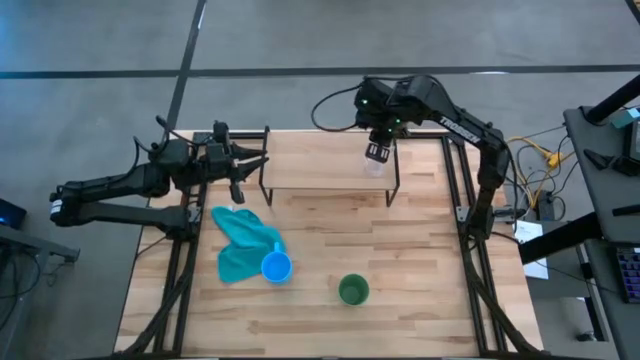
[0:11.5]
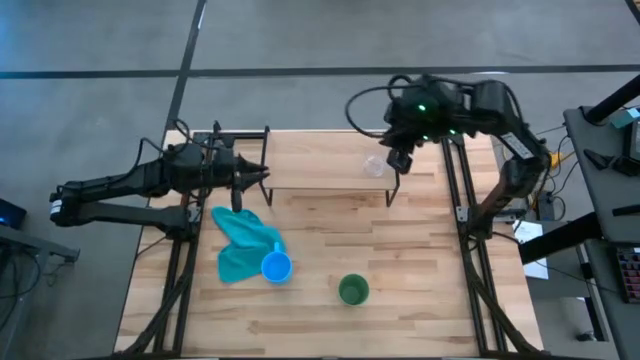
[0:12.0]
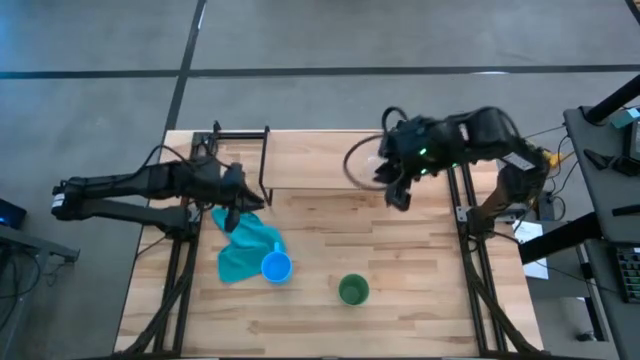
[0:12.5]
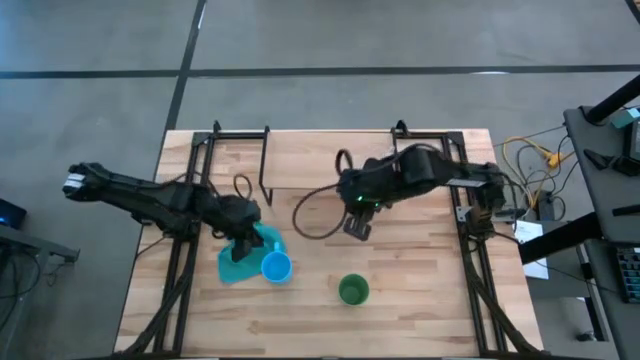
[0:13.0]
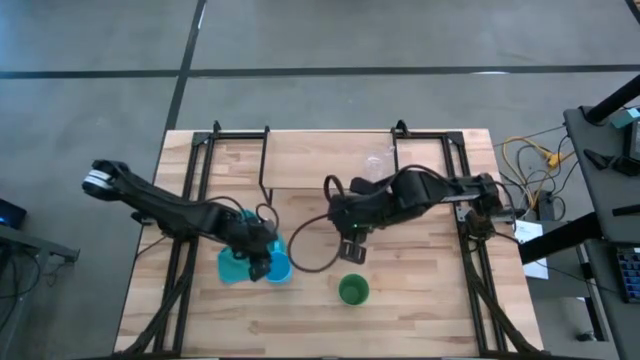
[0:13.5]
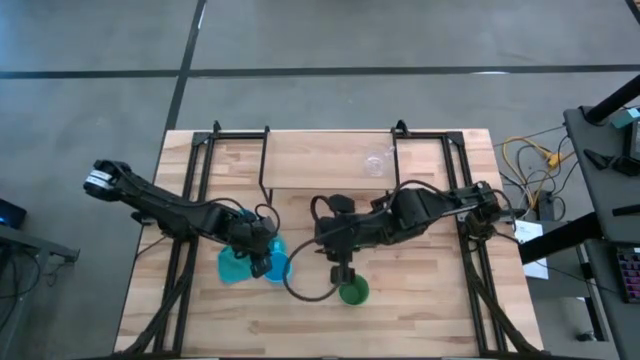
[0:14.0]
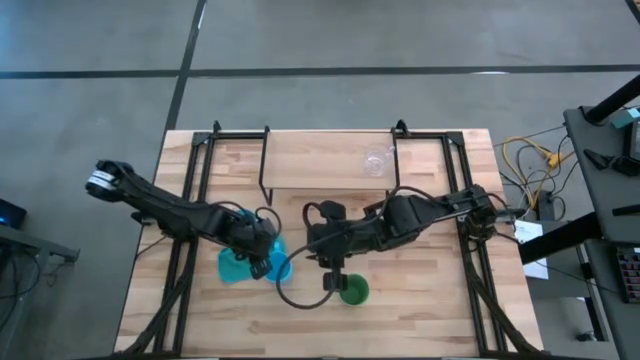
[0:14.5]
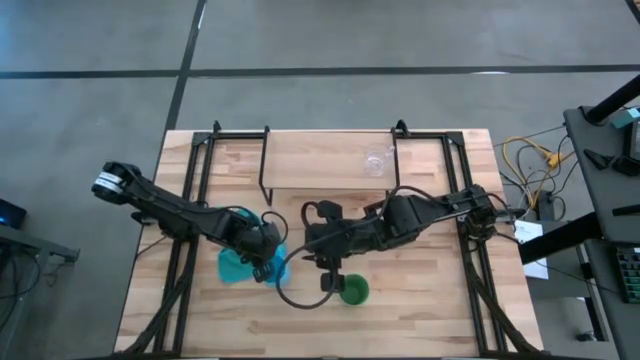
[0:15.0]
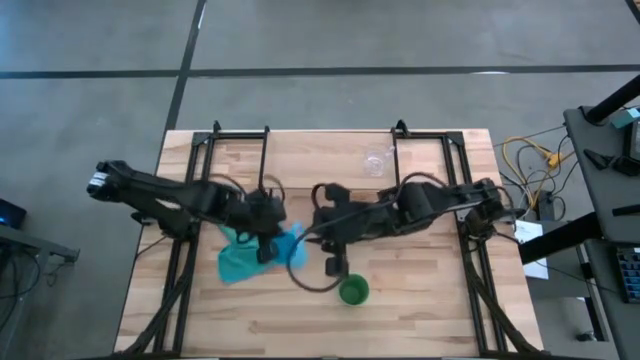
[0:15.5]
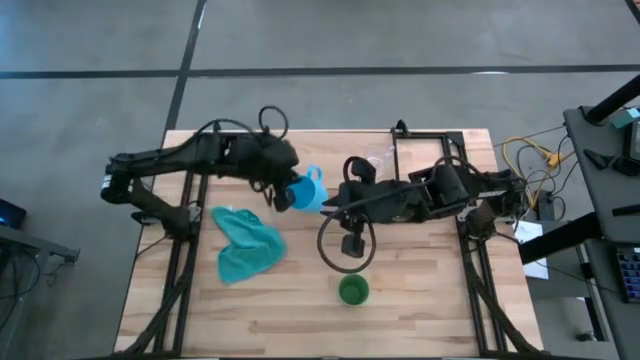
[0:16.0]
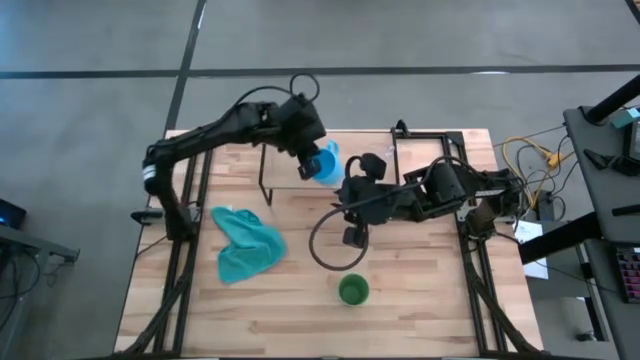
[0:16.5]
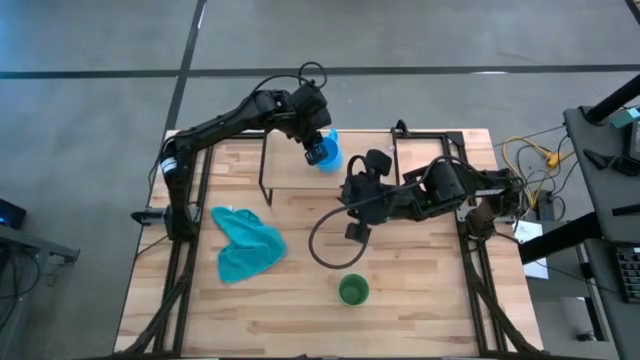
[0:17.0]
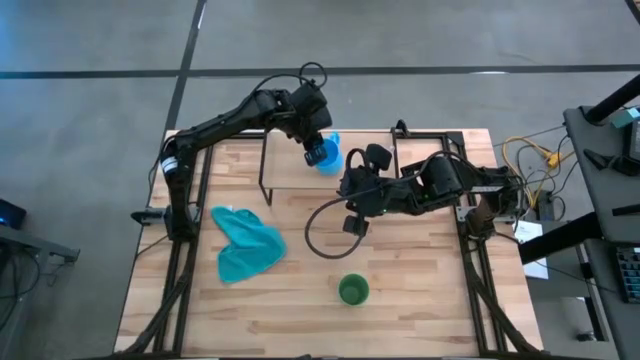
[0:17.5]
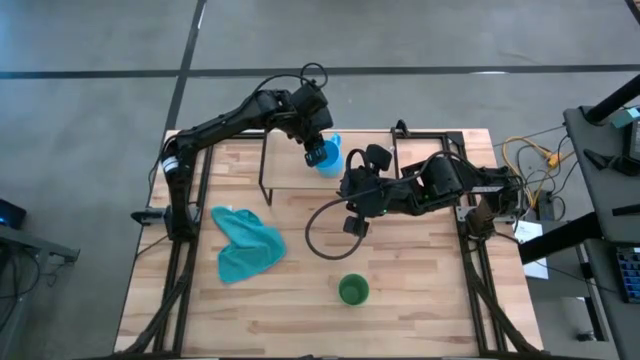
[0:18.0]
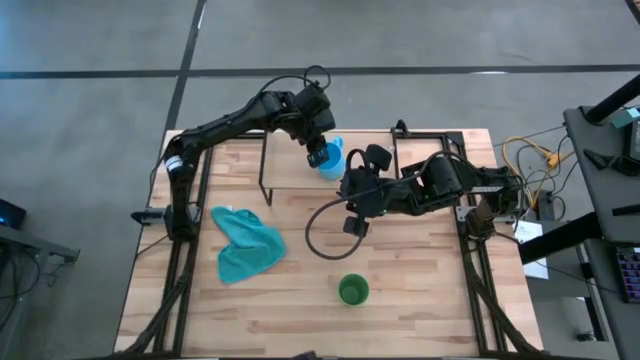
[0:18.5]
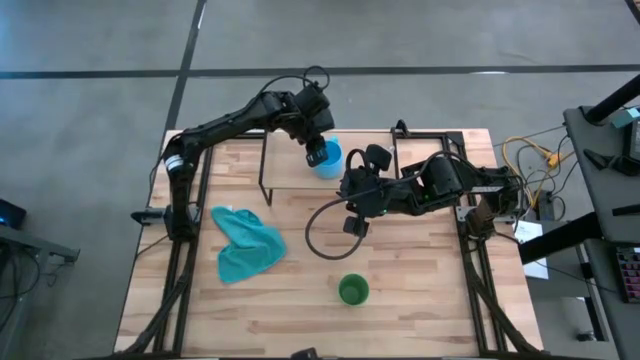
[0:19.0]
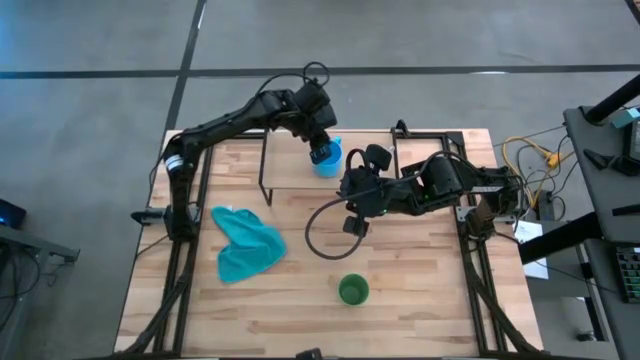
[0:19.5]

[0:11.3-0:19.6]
Task: Stack small to large cups/mugs on shelf
Put the blue mug on the shelf

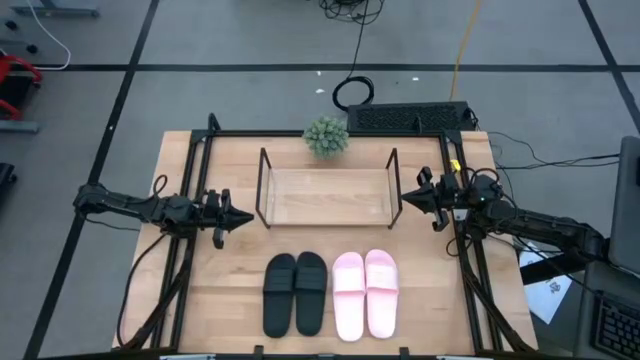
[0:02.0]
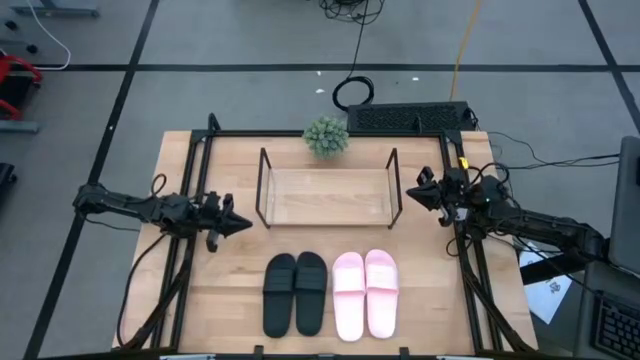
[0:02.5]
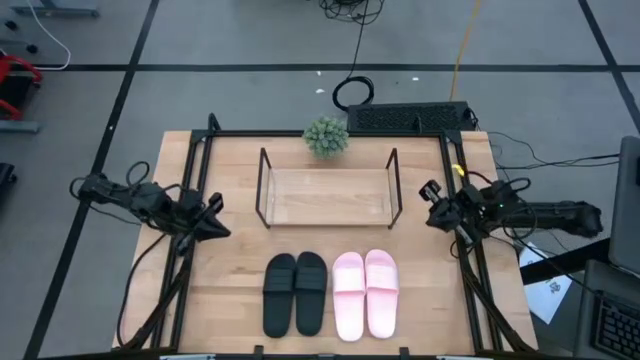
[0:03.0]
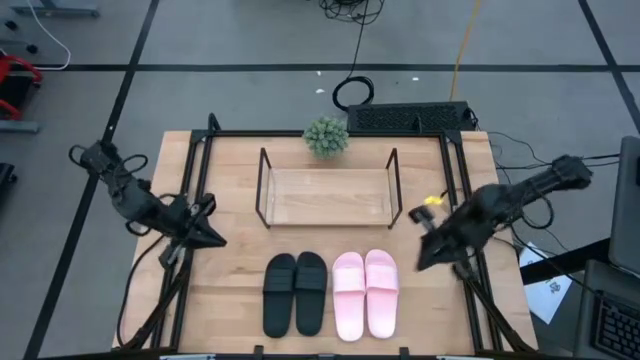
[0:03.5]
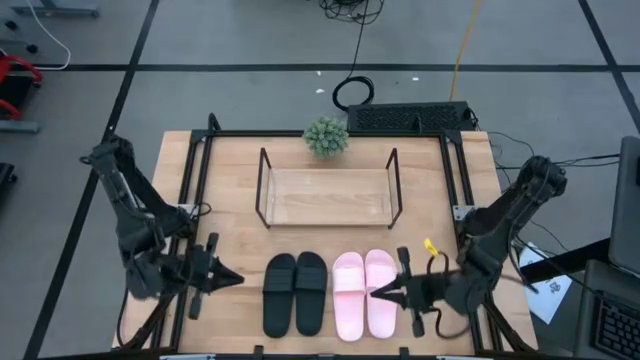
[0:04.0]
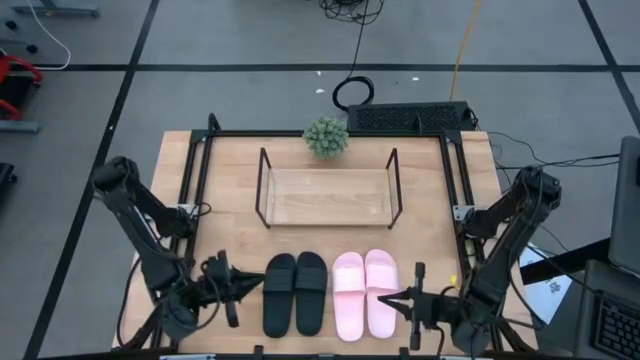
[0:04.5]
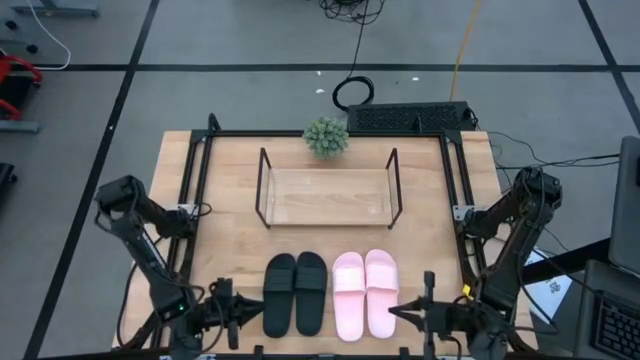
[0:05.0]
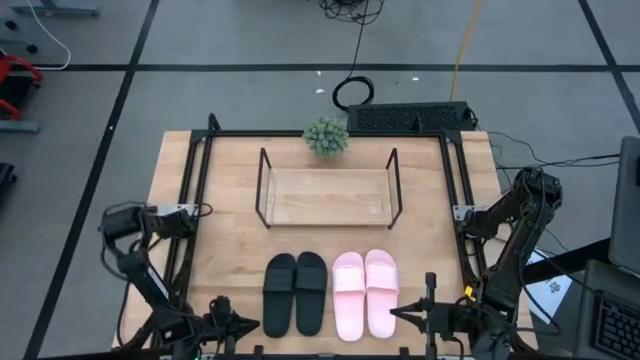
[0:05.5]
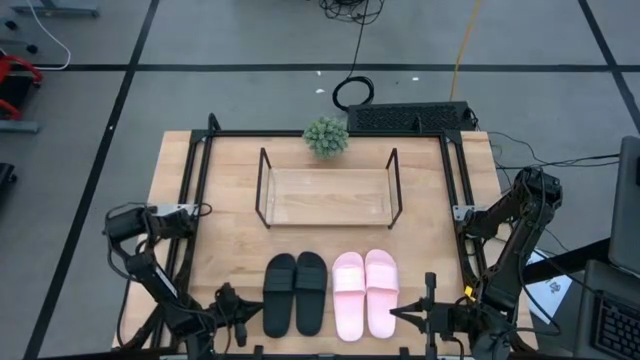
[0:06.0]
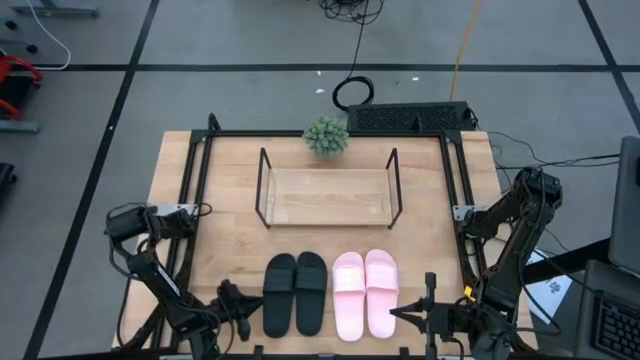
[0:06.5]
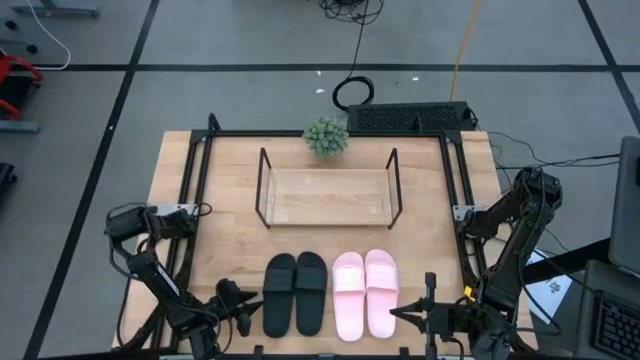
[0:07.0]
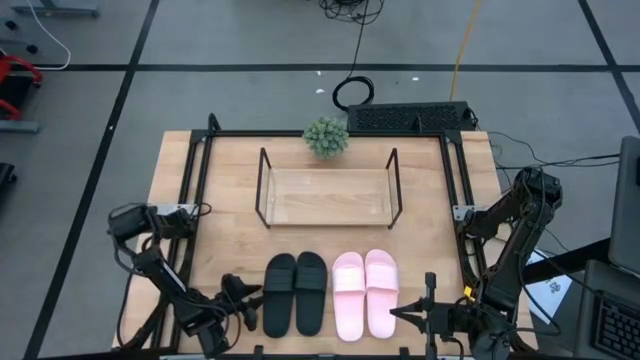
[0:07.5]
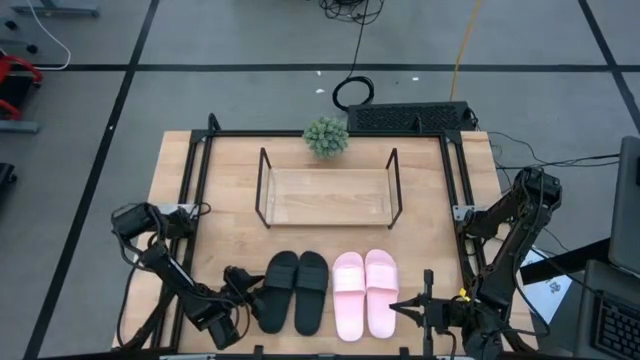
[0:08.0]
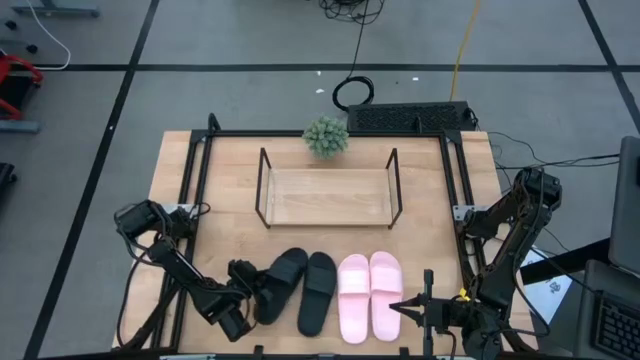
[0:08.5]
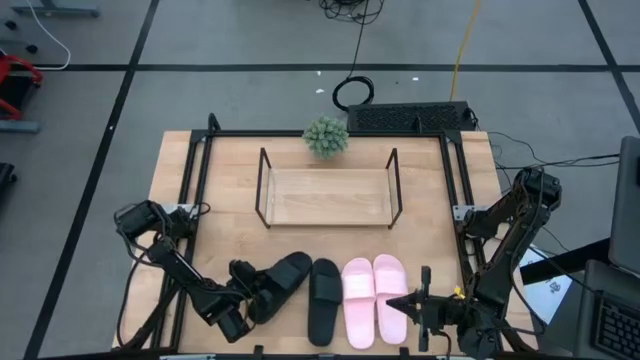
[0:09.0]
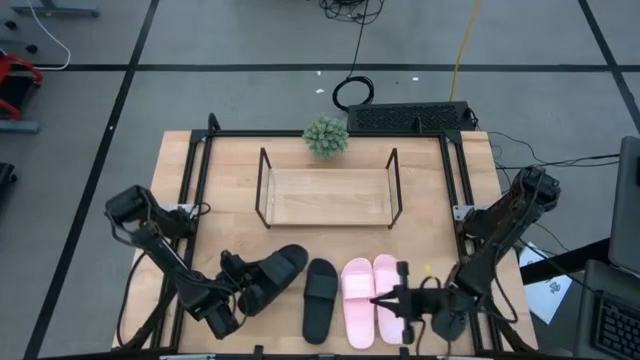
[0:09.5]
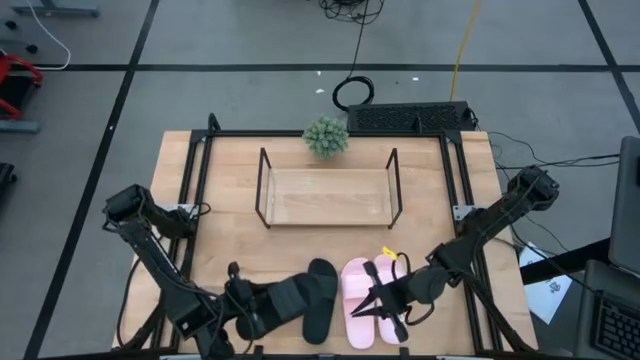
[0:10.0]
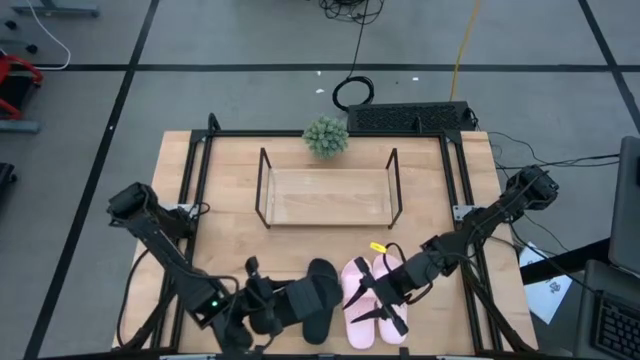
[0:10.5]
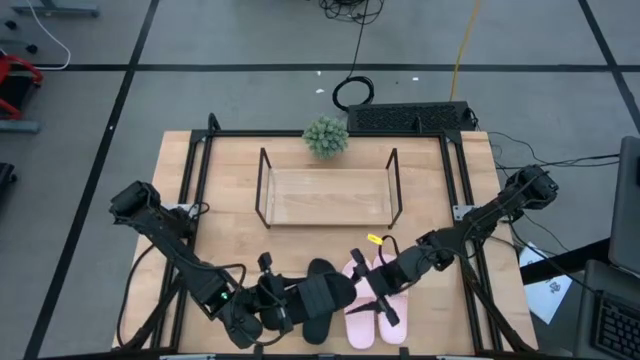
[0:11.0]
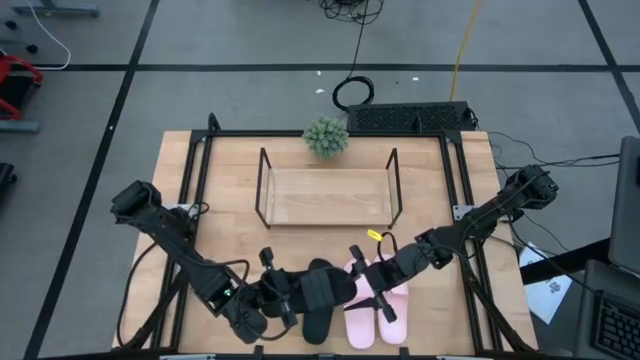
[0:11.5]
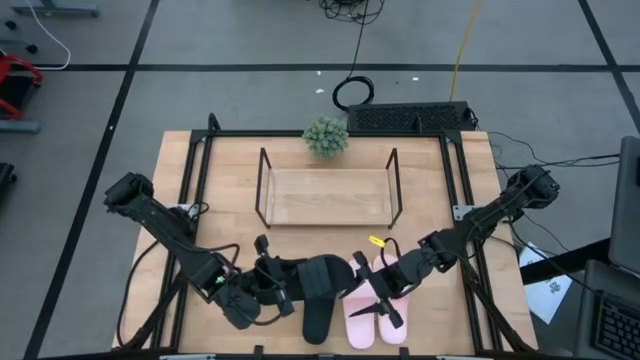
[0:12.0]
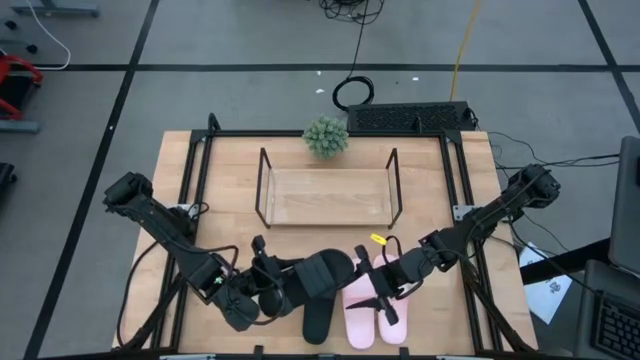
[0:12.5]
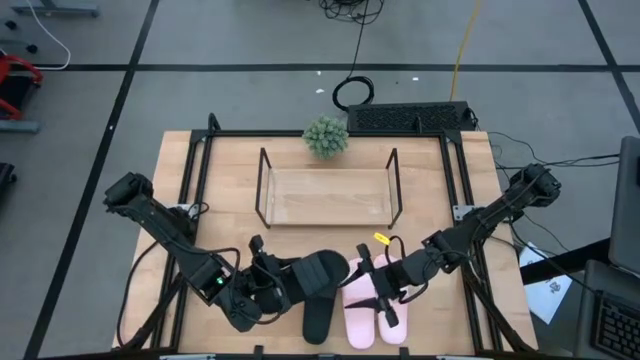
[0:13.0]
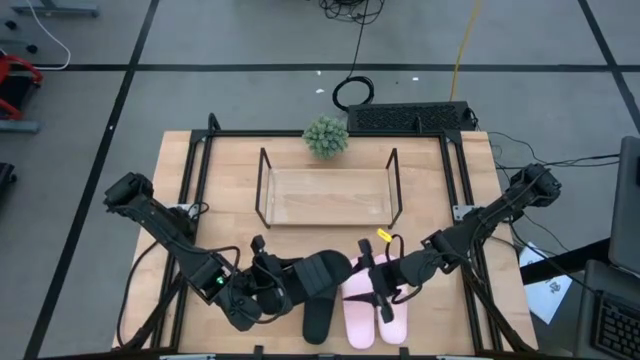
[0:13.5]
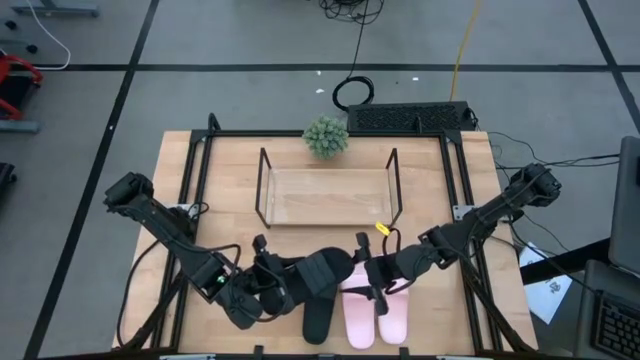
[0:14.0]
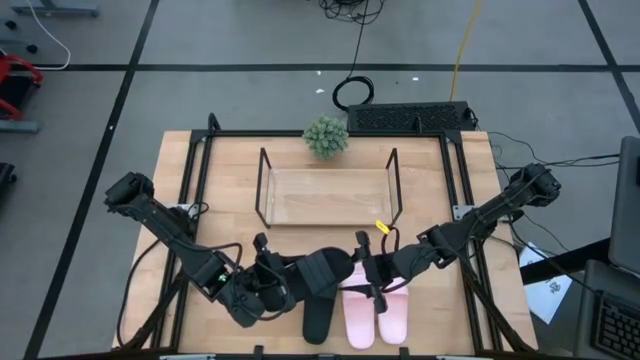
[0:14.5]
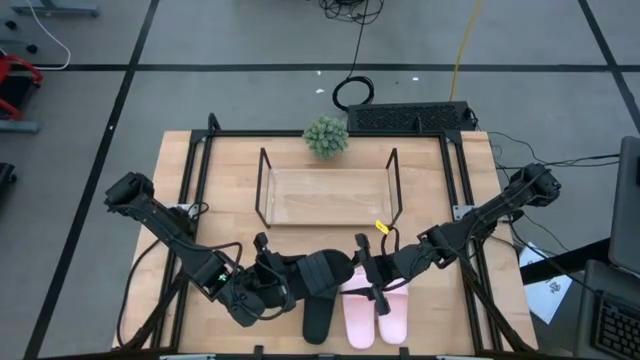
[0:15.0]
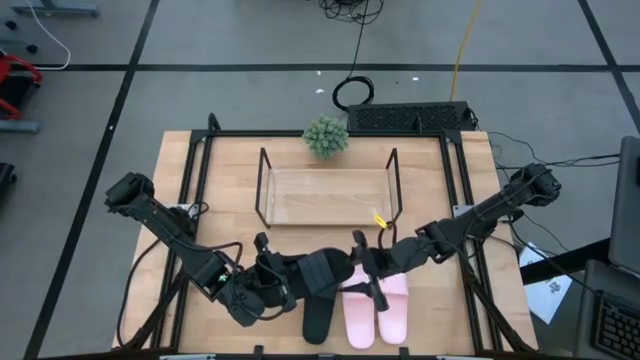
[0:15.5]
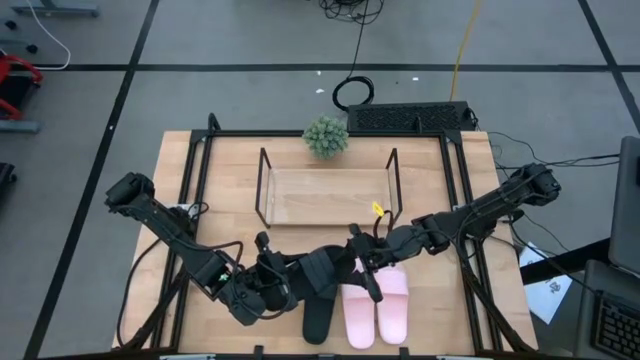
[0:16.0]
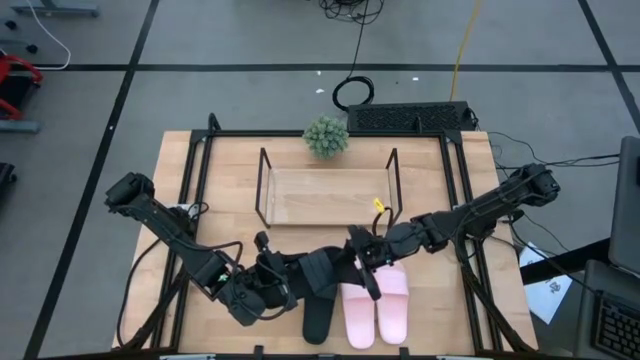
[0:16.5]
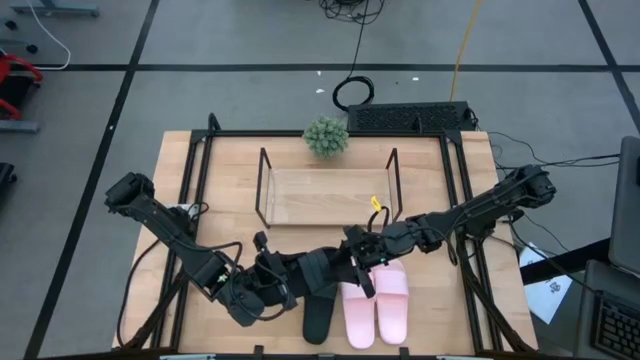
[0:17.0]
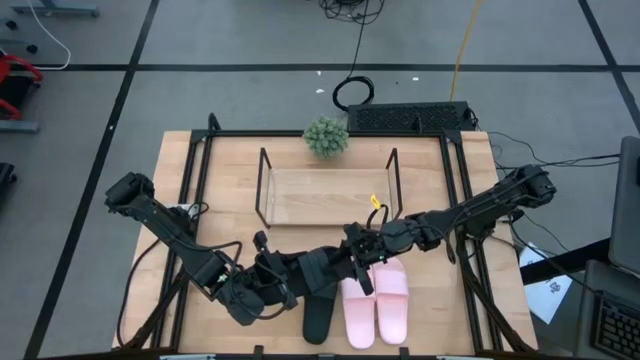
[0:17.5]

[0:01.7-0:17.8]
Task: Pick and place slides into the shelf
Put the left black slides on the shelf
